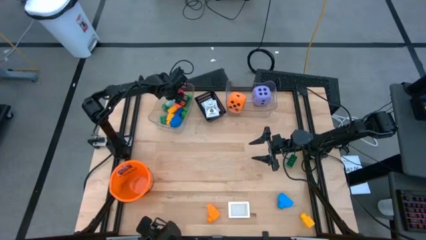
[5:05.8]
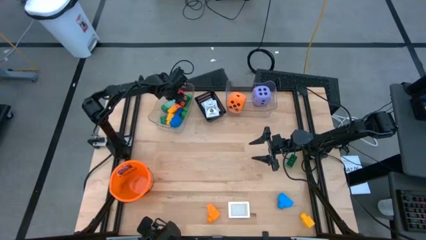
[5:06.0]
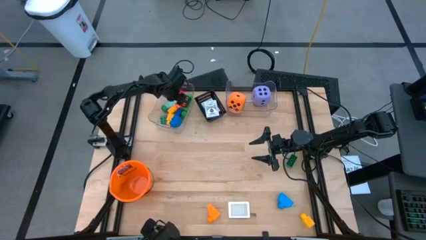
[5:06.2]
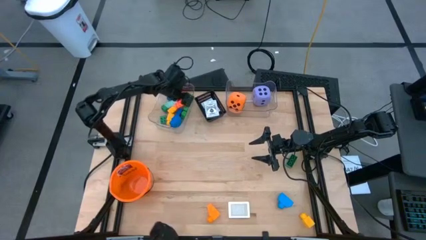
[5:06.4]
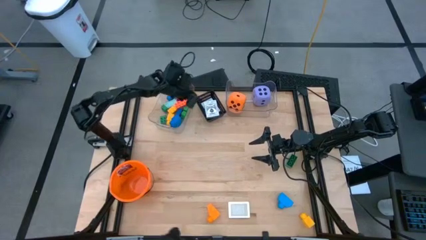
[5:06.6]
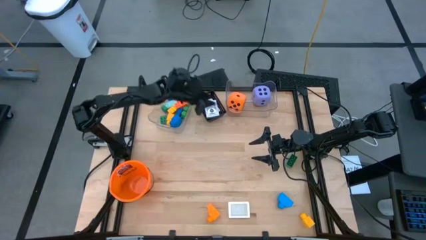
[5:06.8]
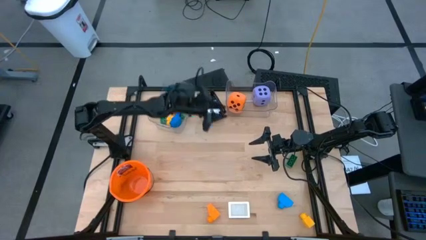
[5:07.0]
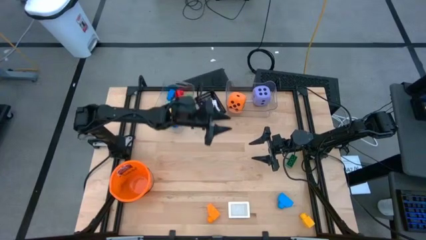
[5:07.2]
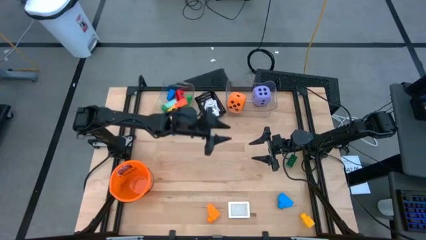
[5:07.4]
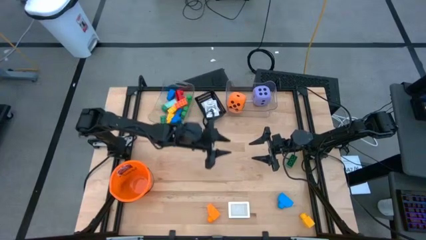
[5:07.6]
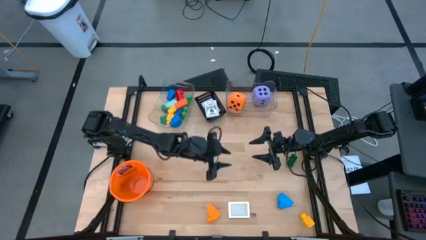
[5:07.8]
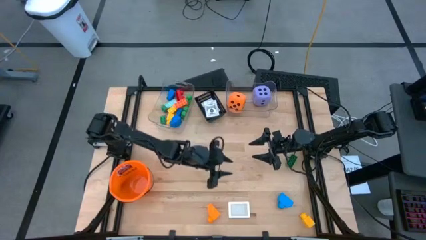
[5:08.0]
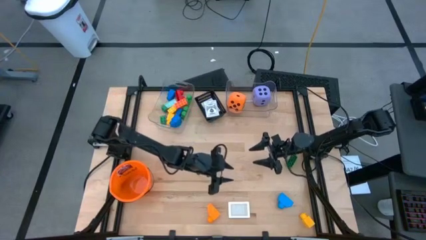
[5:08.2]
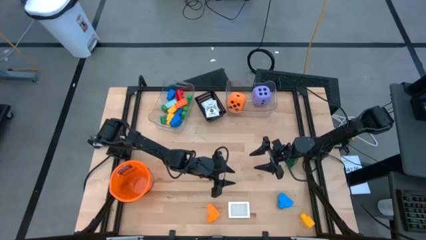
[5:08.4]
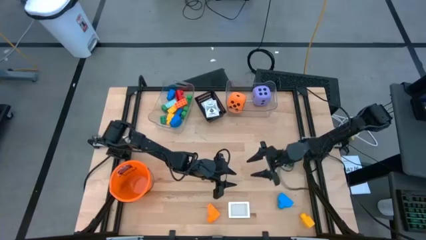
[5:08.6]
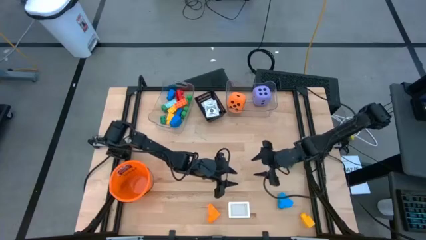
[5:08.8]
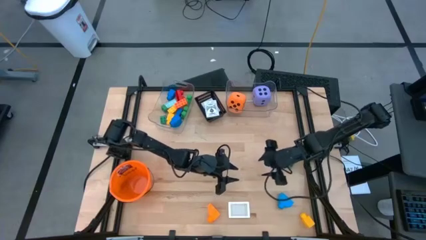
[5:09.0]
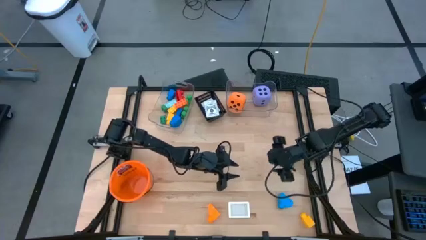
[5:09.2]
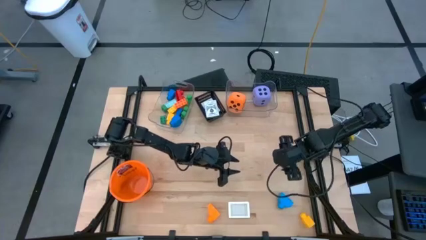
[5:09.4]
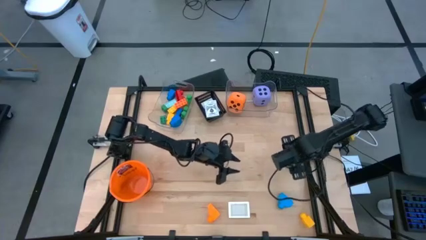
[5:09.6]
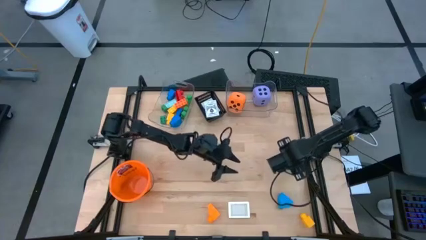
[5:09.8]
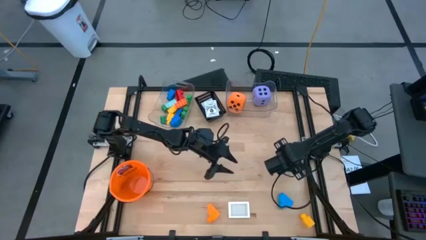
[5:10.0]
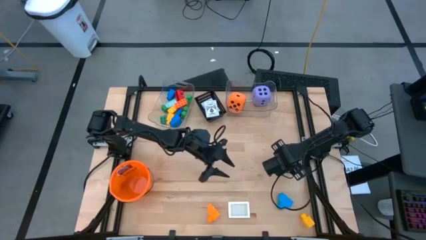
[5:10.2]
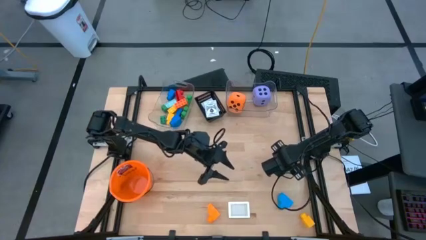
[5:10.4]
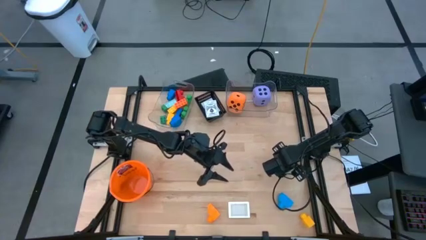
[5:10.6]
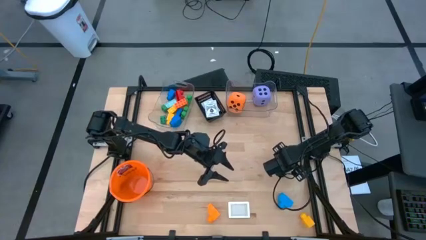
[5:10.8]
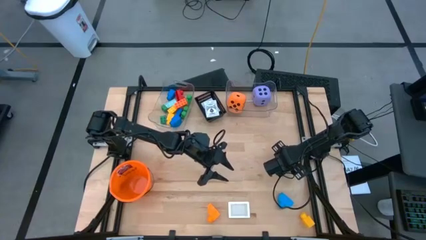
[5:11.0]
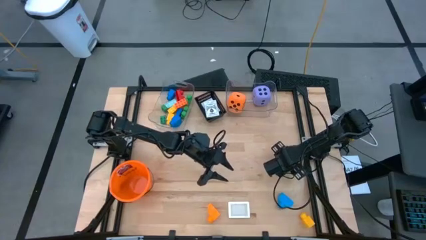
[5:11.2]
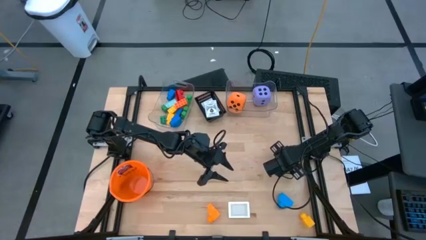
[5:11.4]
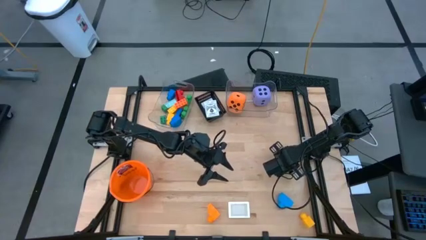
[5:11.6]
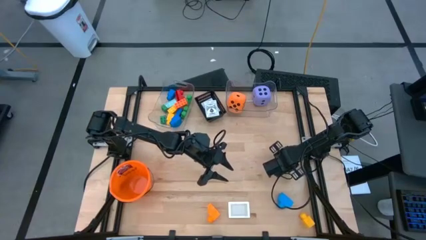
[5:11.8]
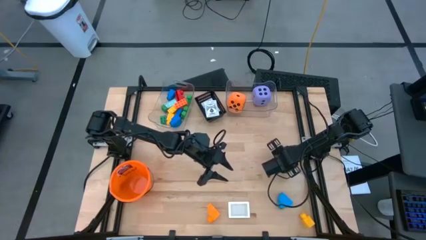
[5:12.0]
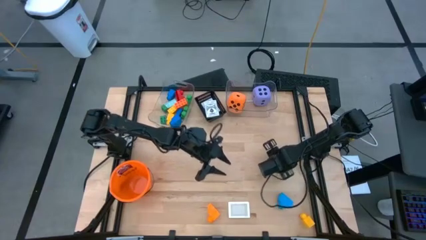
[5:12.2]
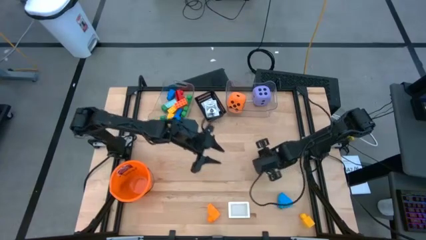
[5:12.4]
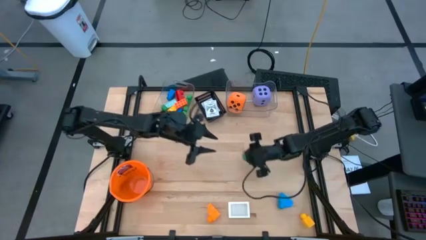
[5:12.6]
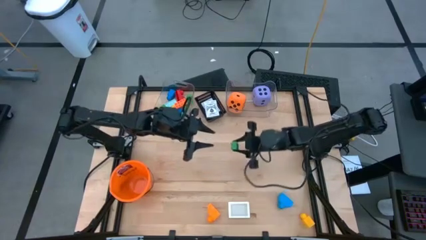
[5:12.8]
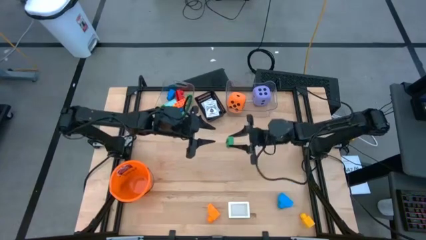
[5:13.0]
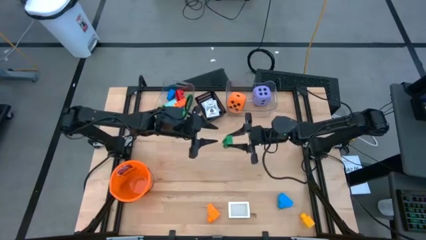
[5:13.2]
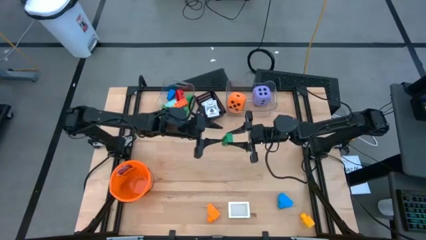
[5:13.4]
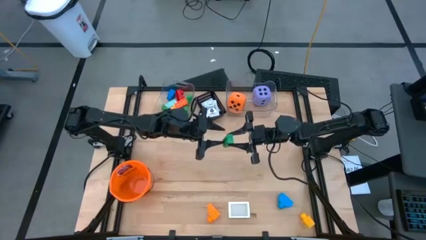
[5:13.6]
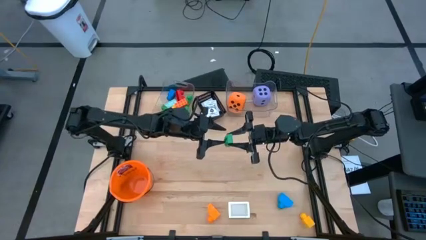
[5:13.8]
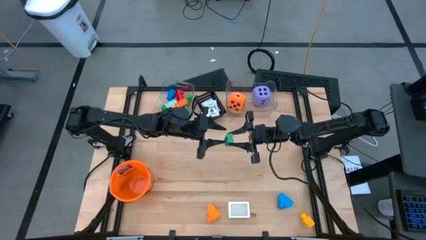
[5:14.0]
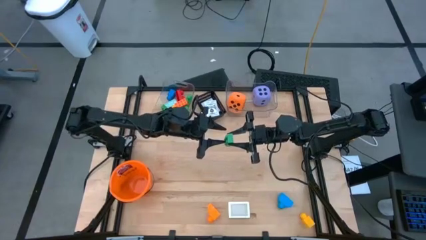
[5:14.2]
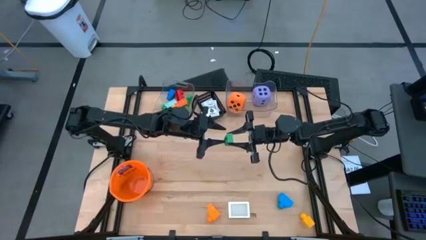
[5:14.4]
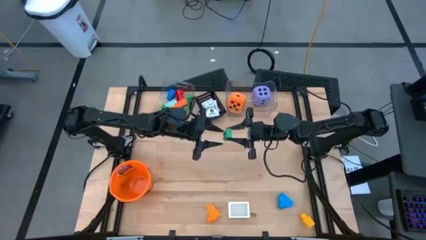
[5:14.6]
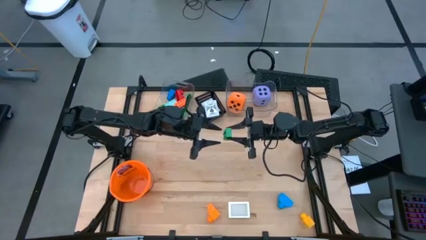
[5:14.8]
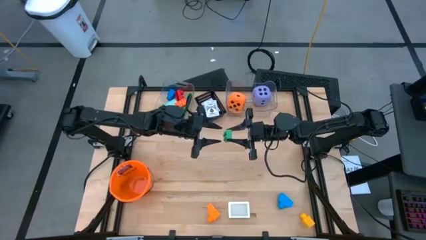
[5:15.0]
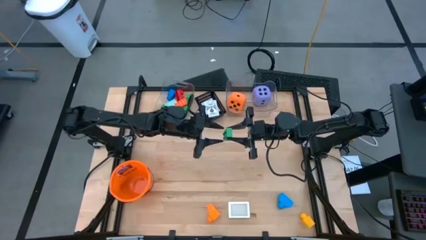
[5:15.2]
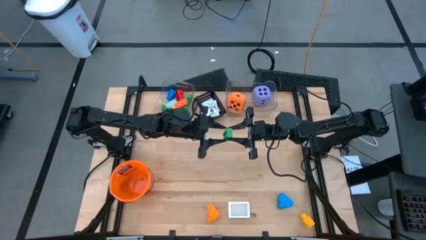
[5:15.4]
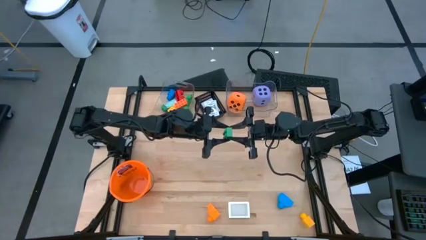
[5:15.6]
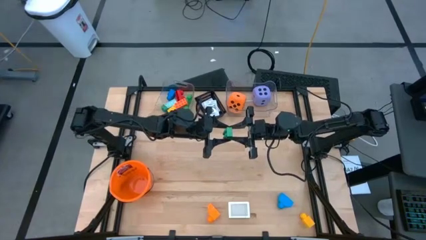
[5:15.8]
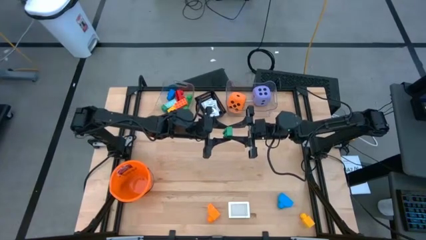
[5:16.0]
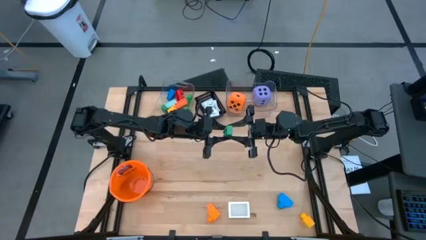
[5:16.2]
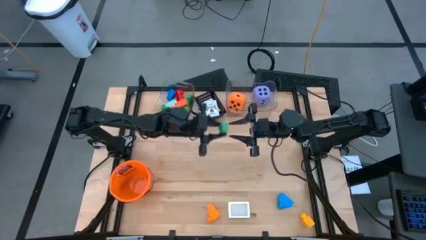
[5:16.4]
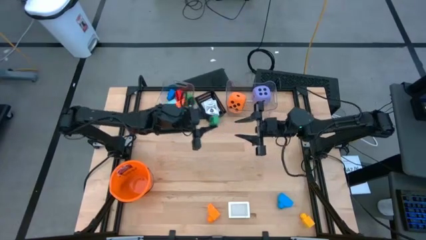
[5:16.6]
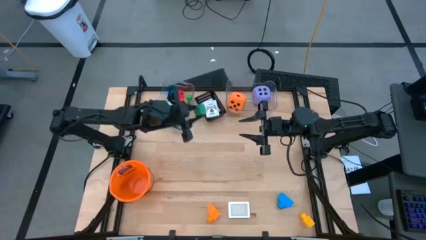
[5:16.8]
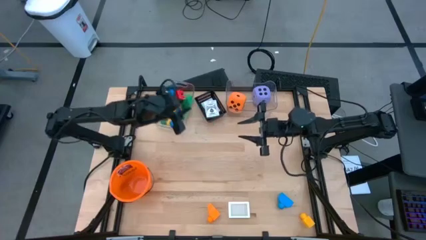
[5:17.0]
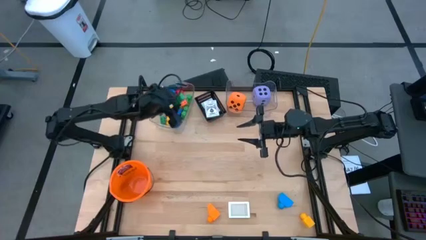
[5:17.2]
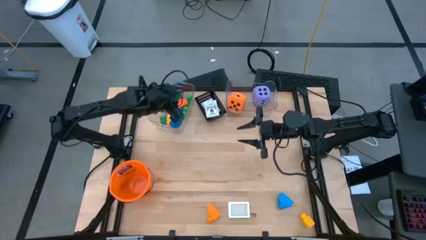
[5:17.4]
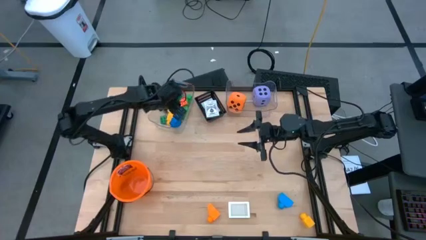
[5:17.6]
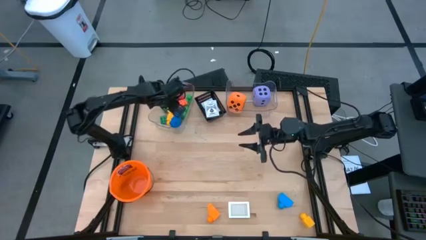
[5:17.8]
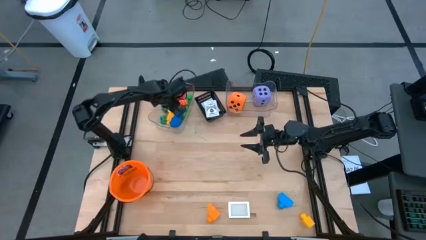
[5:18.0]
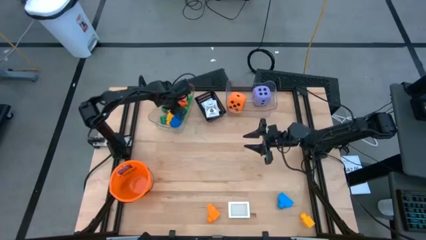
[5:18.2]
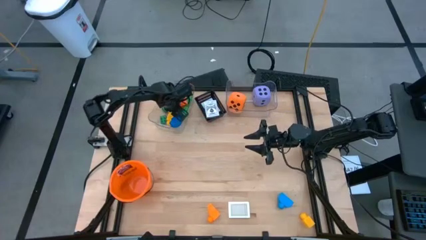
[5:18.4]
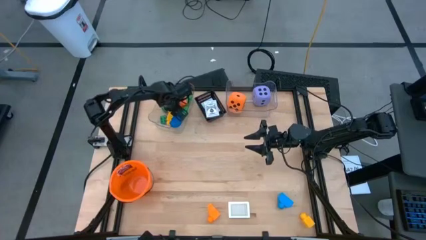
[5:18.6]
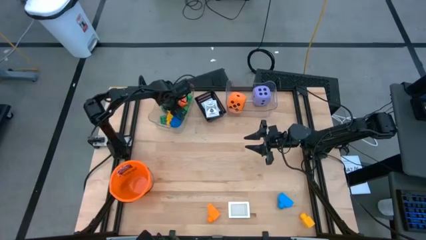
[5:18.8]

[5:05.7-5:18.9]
Task: Pick & Place Toys
Put the green gamepiece into the left transparent bin
